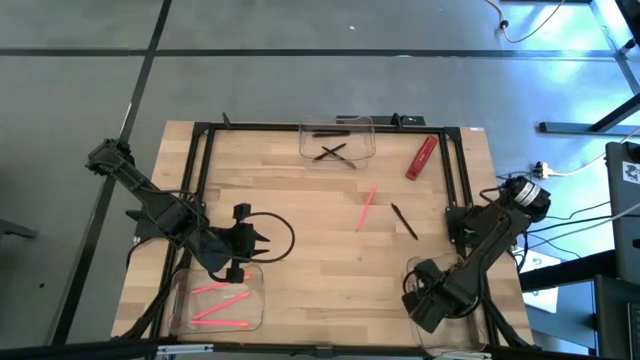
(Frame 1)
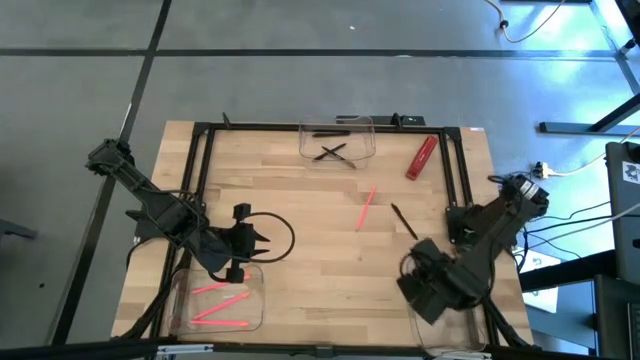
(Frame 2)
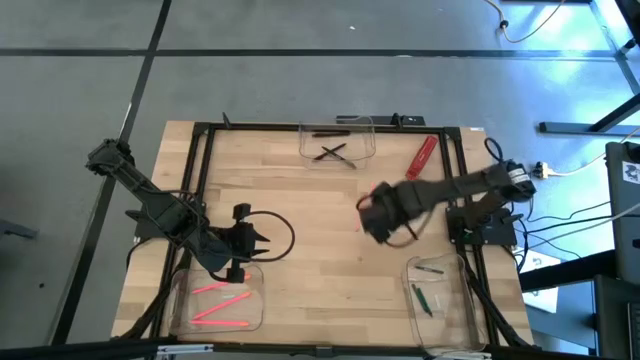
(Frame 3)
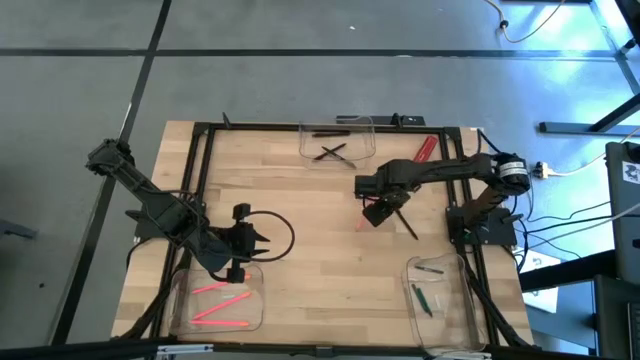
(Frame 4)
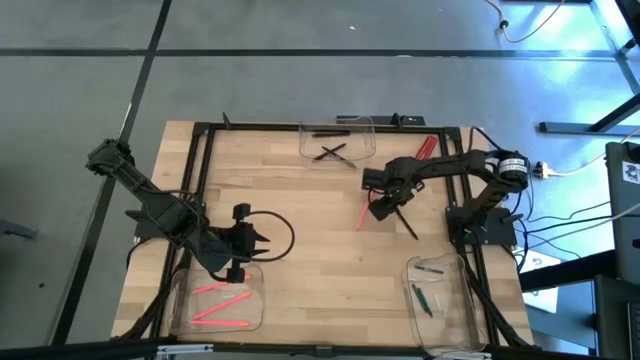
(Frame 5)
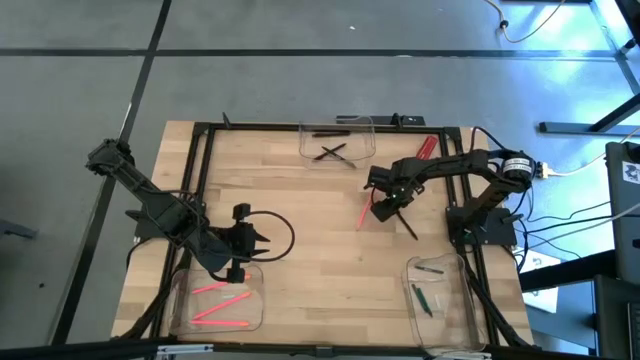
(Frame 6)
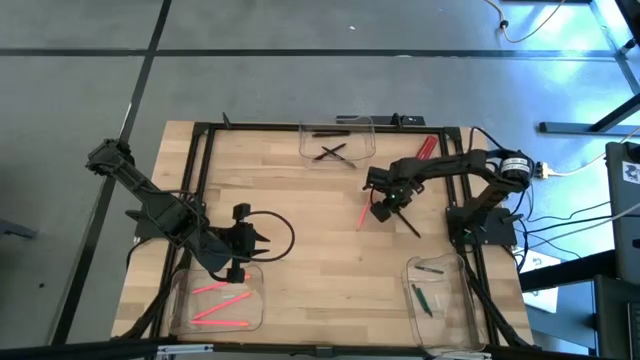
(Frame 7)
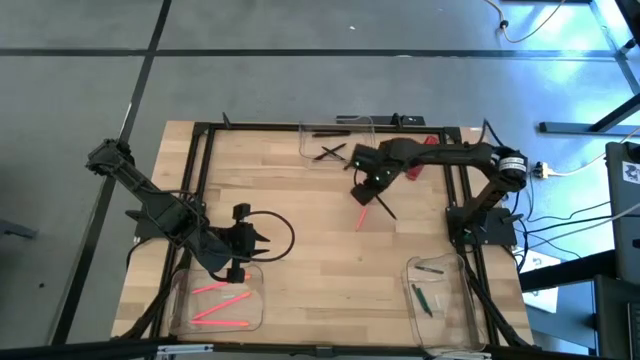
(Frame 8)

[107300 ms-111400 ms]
Task: Sort crayons/erasers/pens/pencils in bins
Put the black pen into the top transparent bin

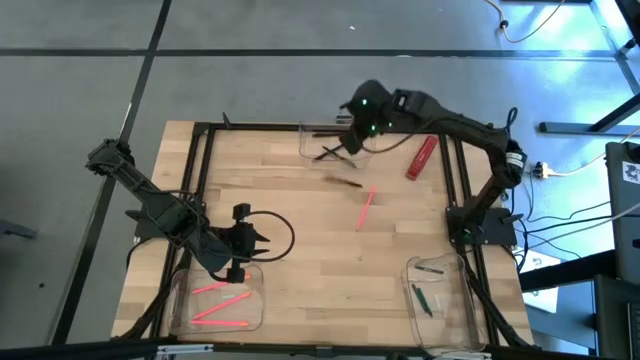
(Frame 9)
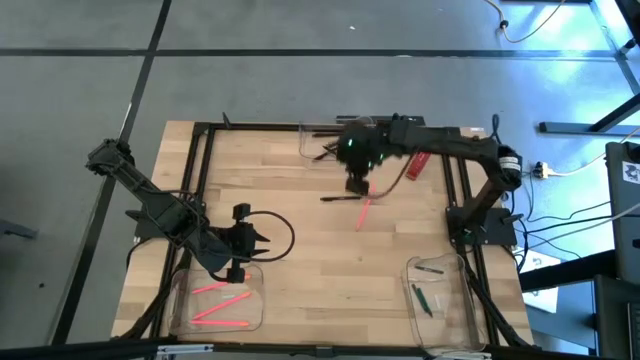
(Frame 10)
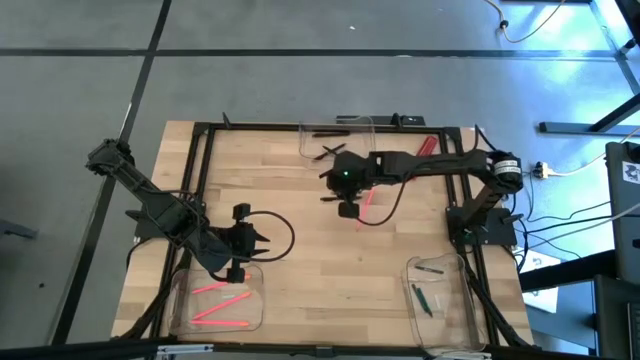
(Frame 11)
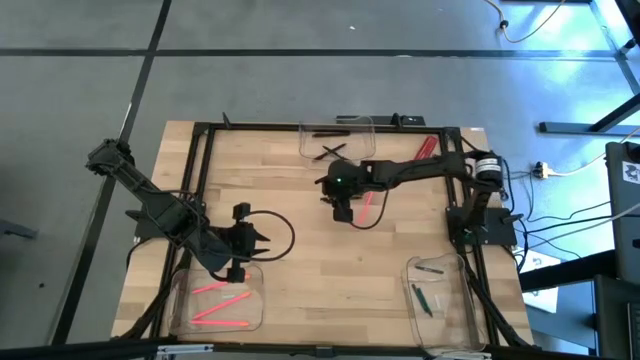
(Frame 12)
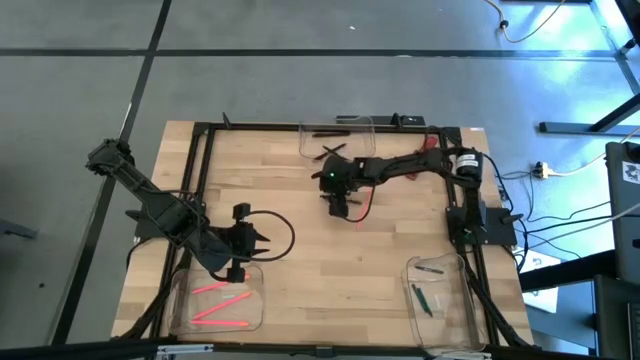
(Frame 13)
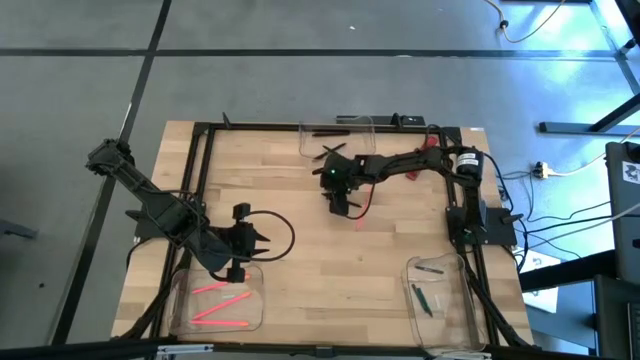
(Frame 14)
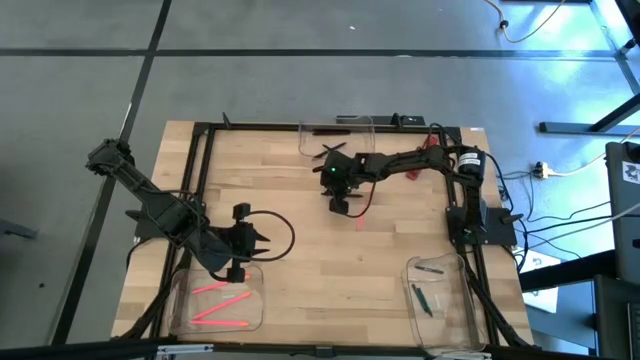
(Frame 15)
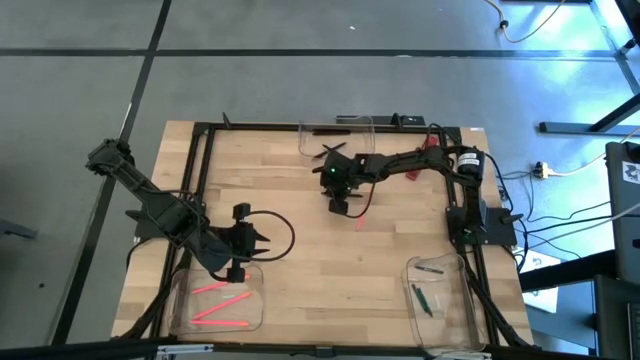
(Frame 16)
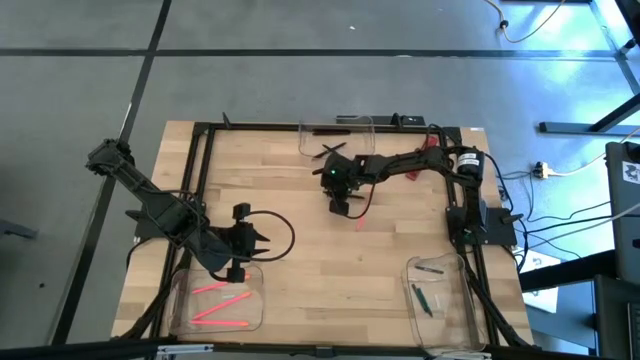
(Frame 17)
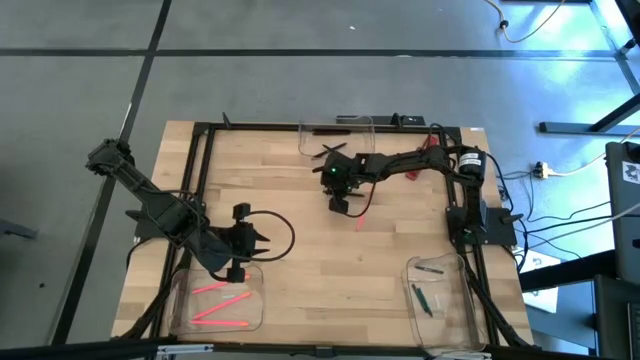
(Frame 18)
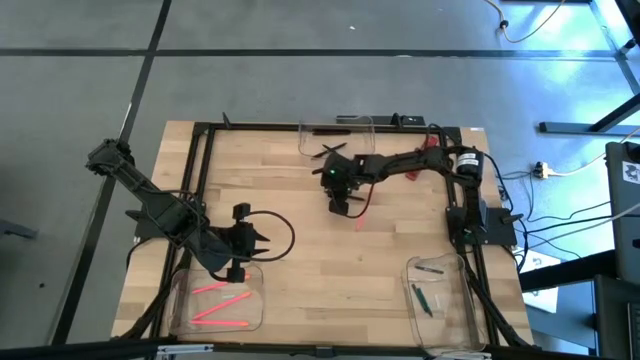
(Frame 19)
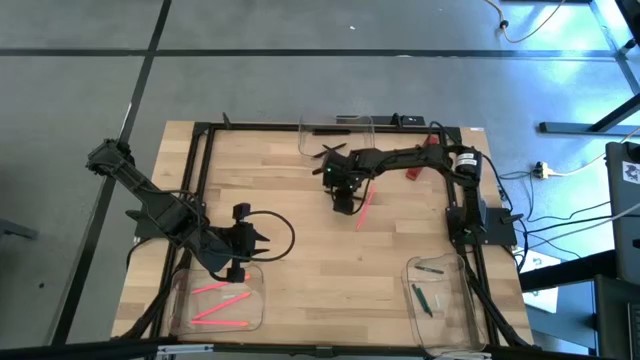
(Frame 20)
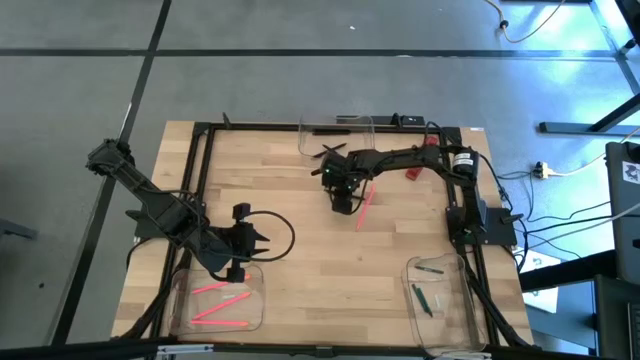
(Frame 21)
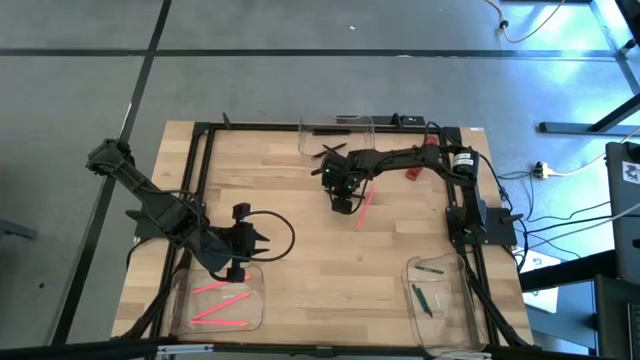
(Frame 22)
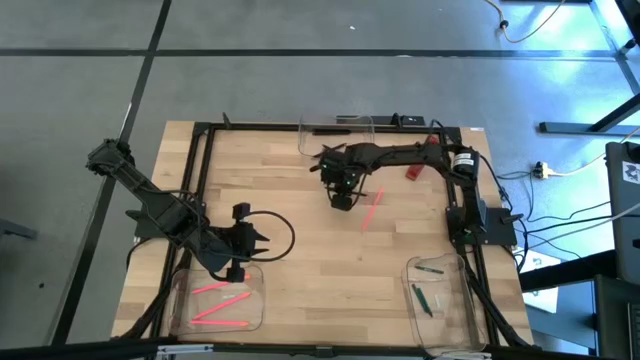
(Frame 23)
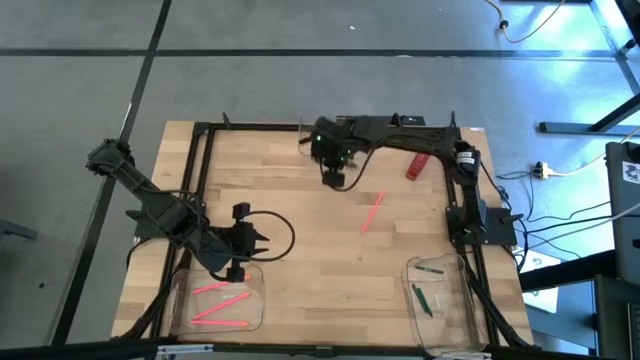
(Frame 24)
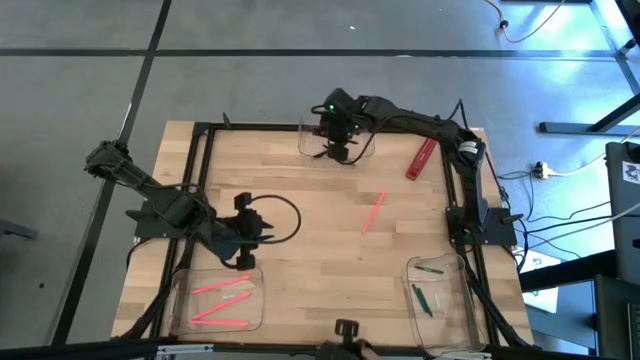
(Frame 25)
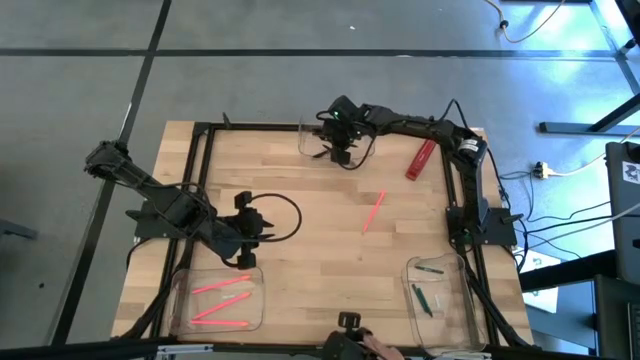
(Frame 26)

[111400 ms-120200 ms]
Put the black pen into the top transparent bin

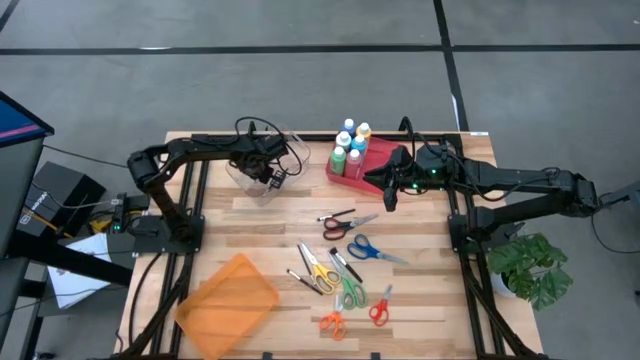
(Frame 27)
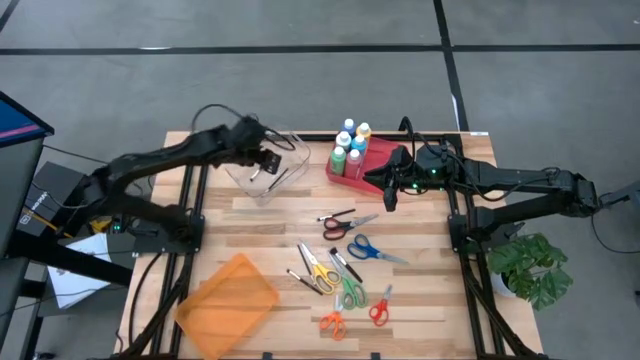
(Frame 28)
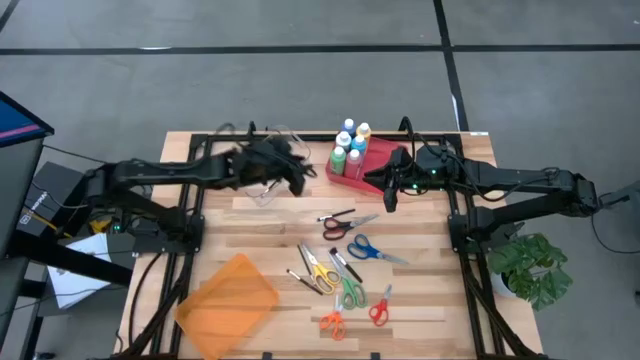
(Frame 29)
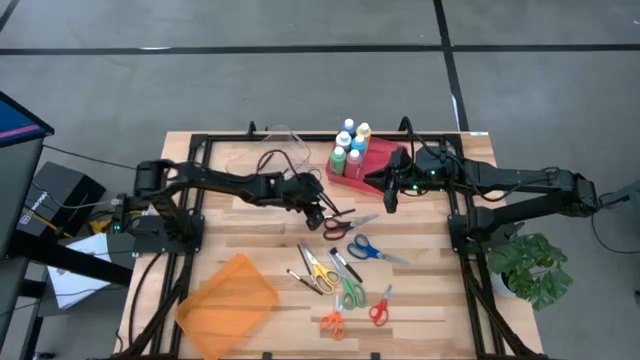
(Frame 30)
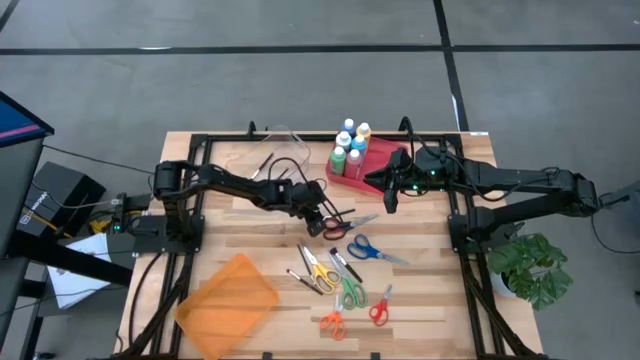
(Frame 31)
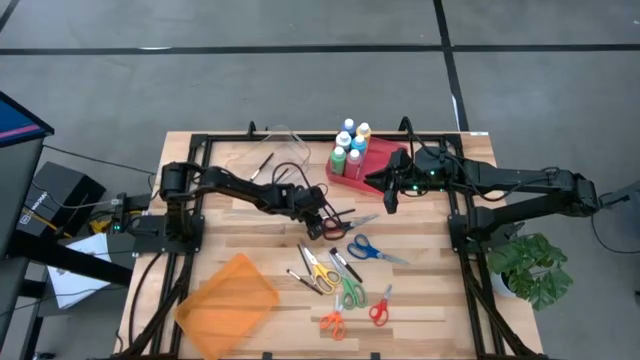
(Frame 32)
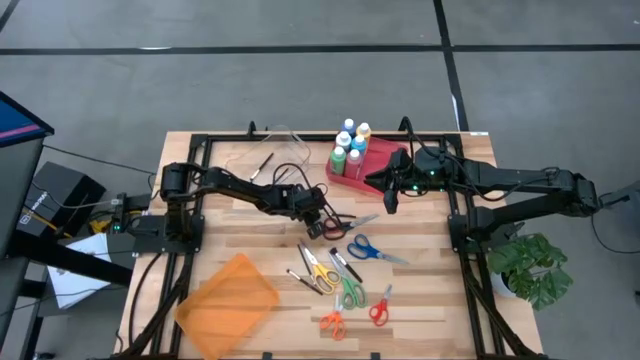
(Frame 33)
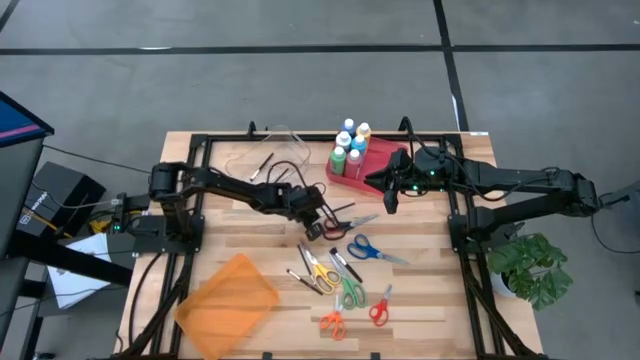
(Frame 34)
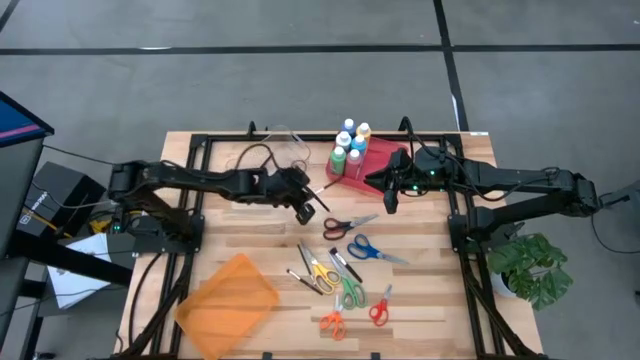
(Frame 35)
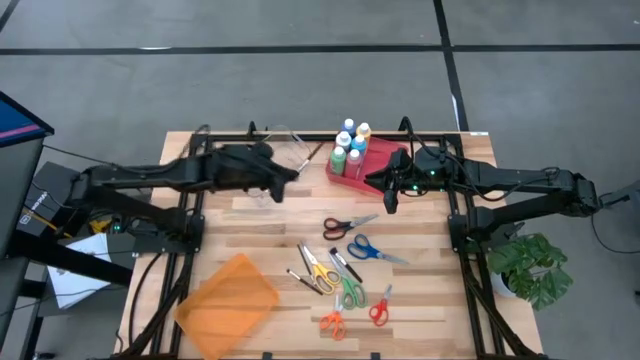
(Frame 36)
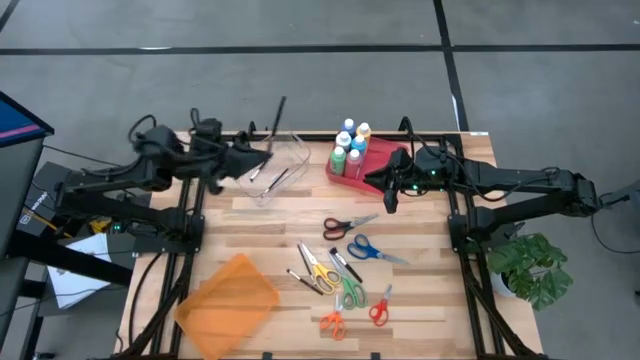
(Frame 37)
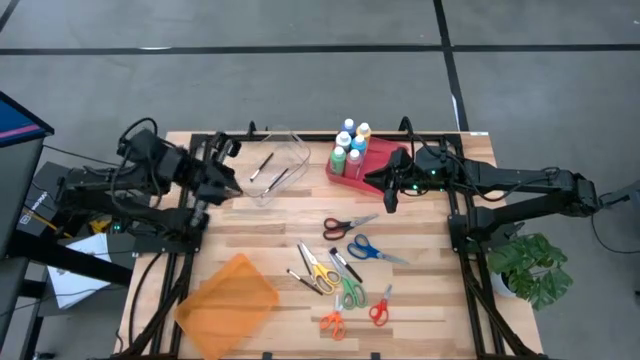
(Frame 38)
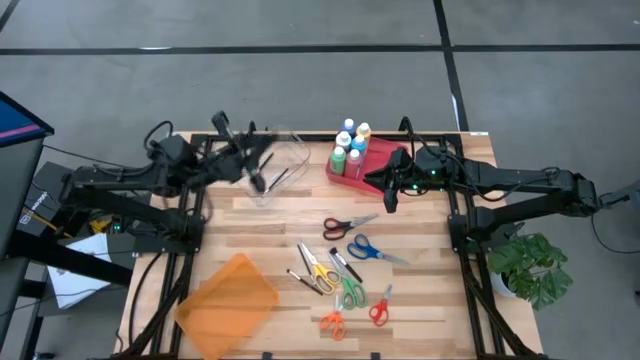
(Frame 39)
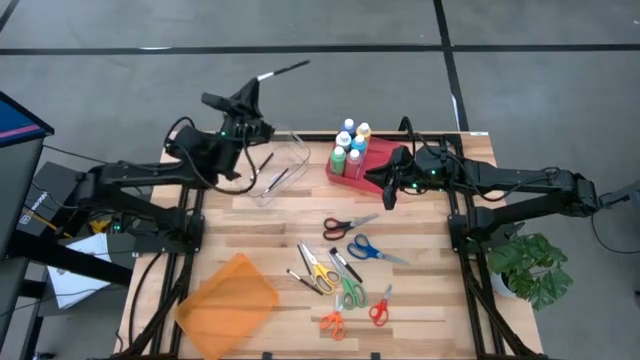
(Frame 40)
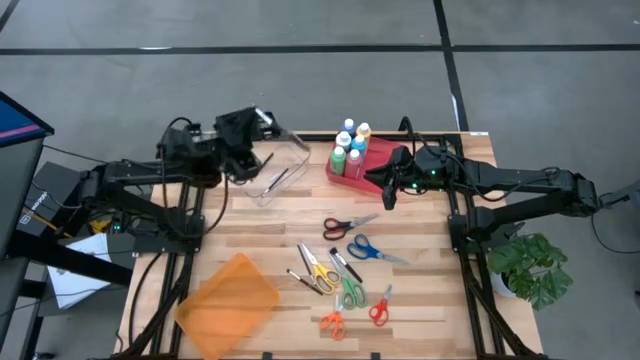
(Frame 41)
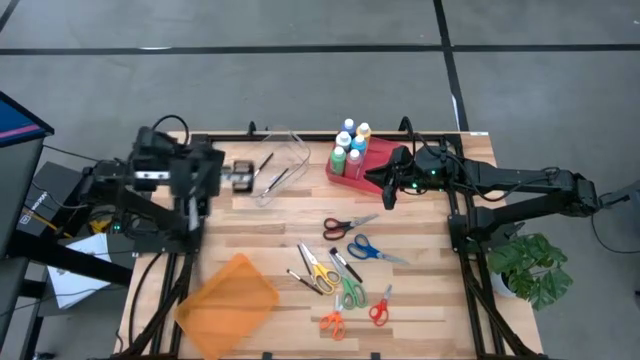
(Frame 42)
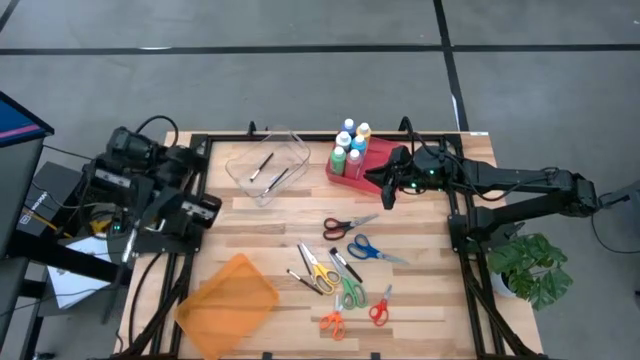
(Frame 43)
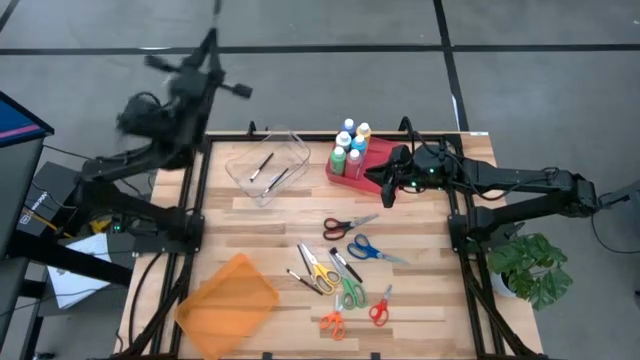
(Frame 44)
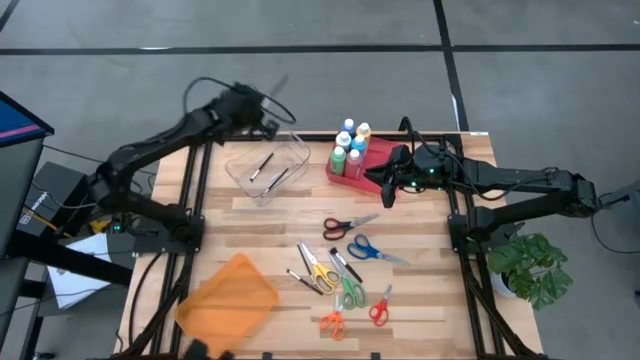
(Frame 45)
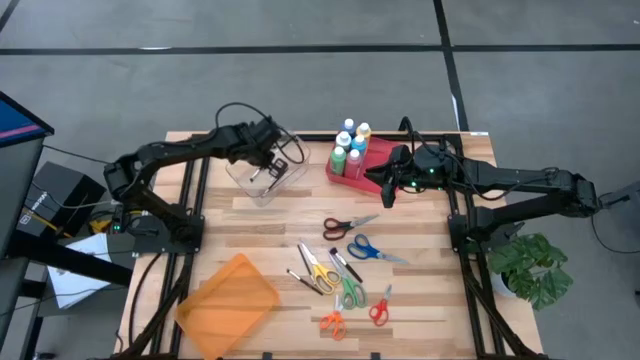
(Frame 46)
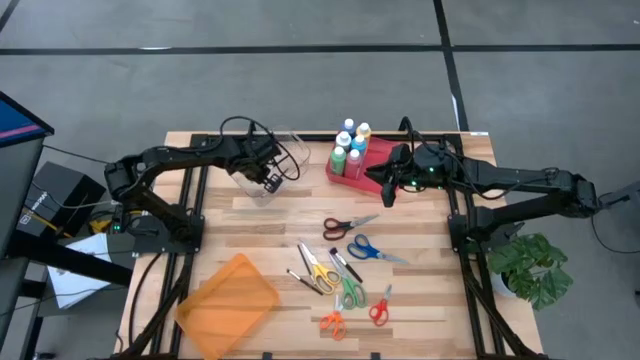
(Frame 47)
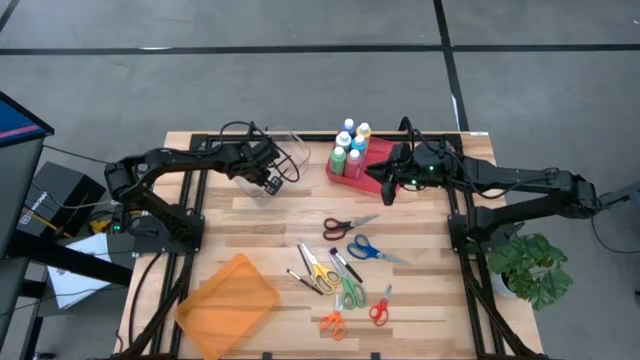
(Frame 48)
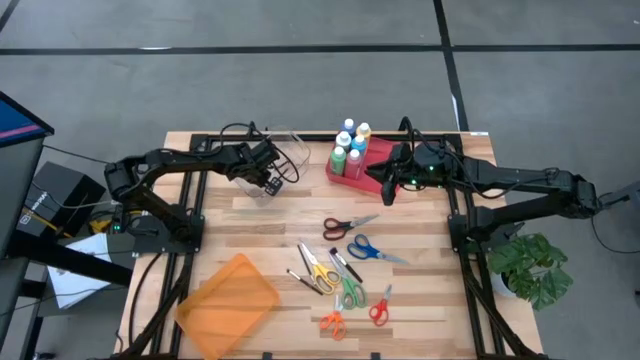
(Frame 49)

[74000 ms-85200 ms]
Task: Pick & Place Paint Supplies
Put the black paint brush into the transparent bin
